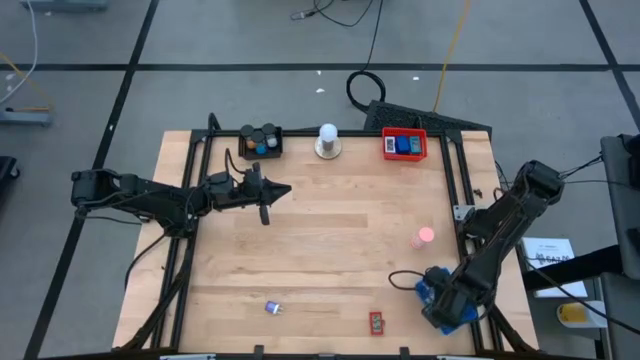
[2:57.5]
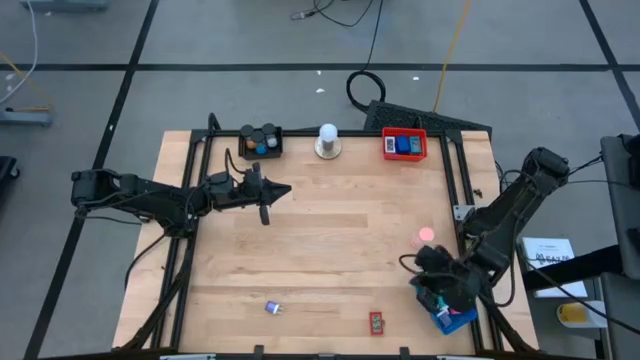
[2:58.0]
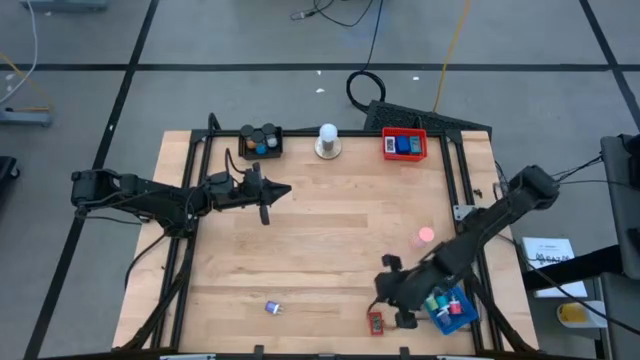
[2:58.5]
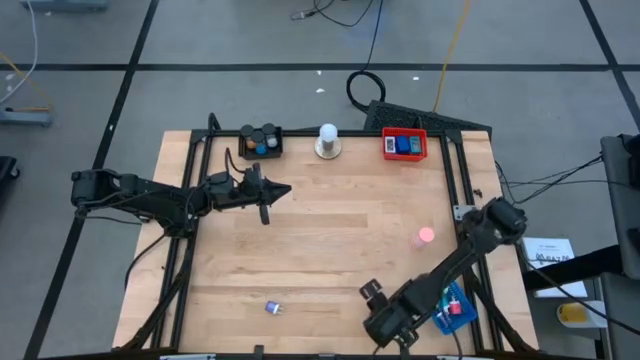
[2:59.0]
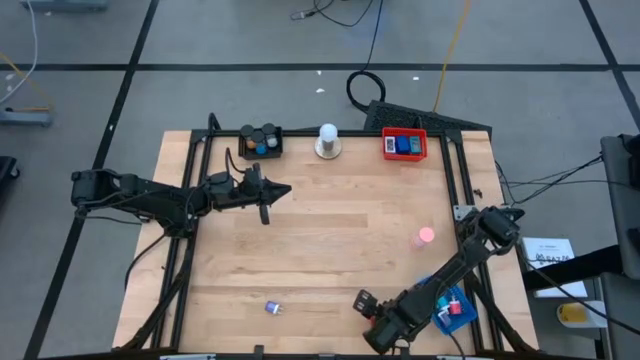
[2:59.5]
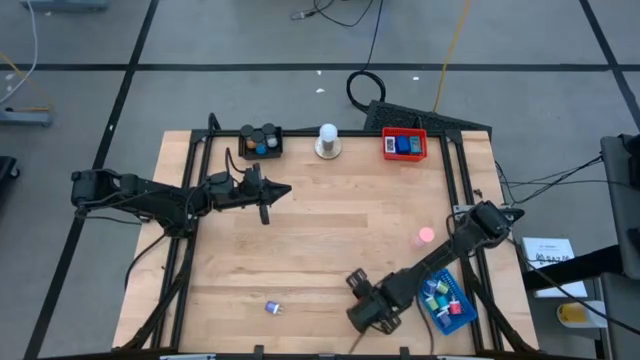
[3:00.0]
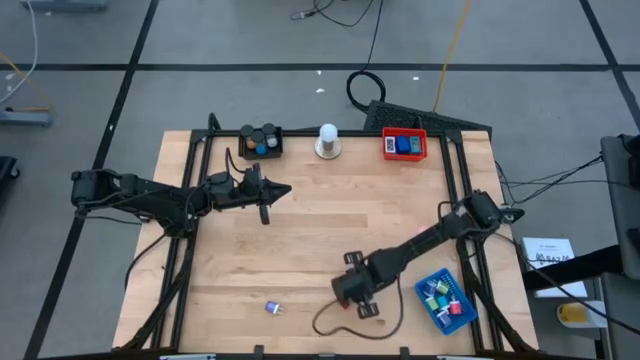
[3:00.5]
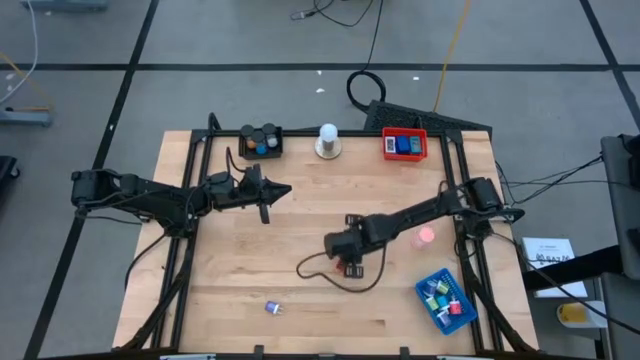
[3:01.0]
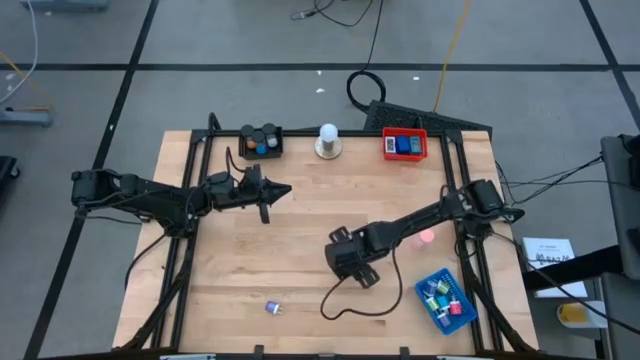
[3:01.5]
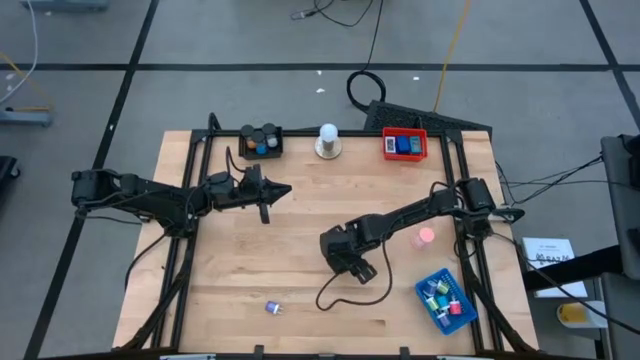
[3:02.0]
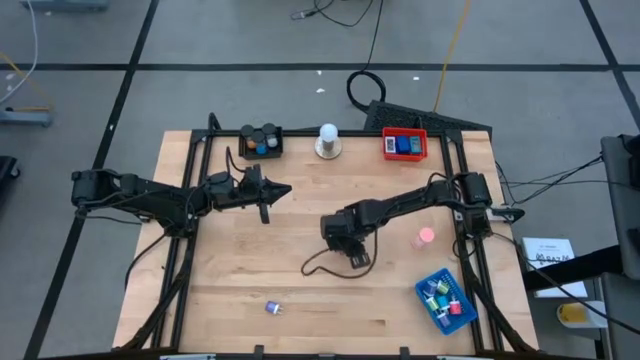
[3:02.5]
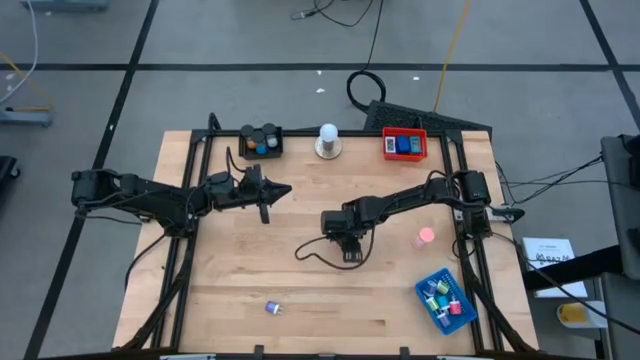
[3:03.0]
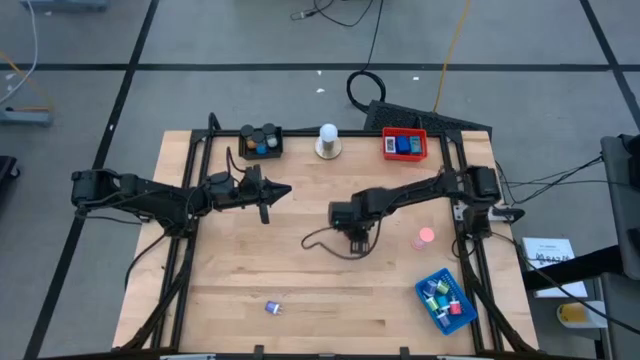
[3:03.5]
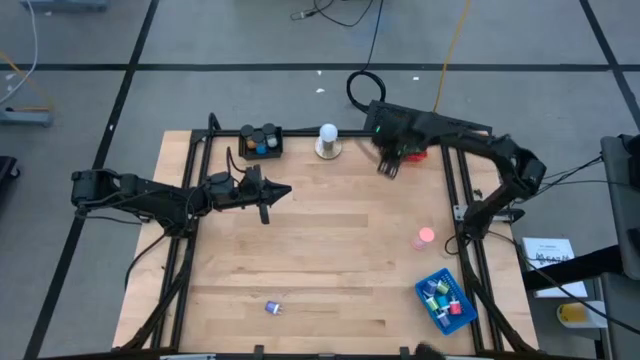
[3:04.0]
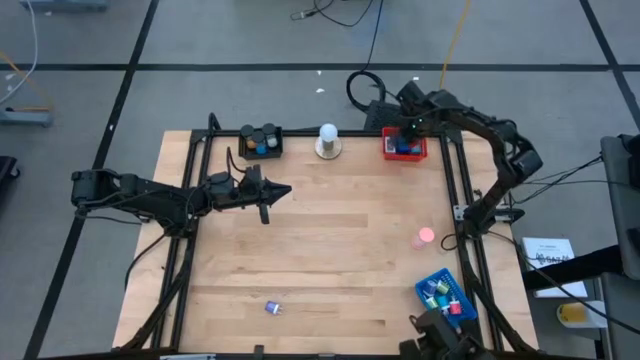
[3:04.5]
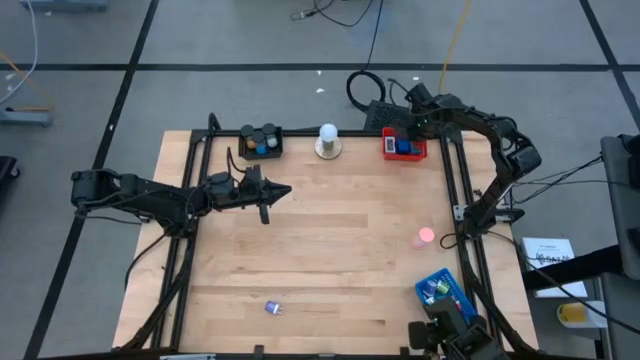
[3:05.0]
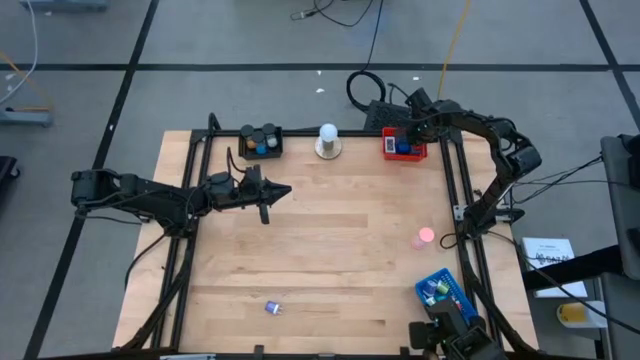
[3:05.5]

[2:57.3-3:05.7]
Task: Pick & Place Office items
Put the red digital timer into the red bin

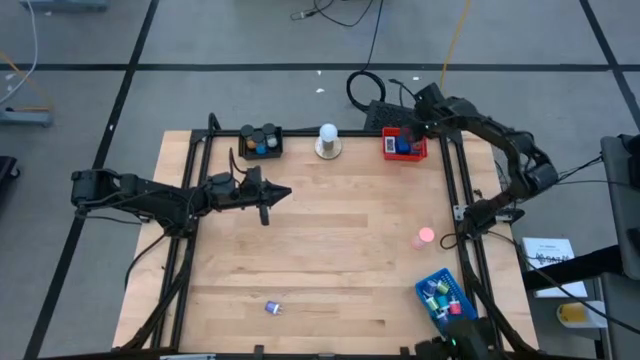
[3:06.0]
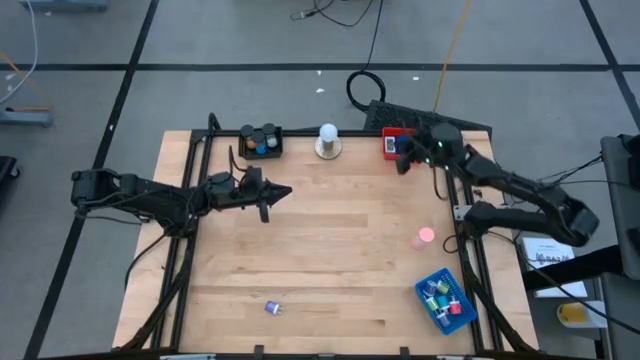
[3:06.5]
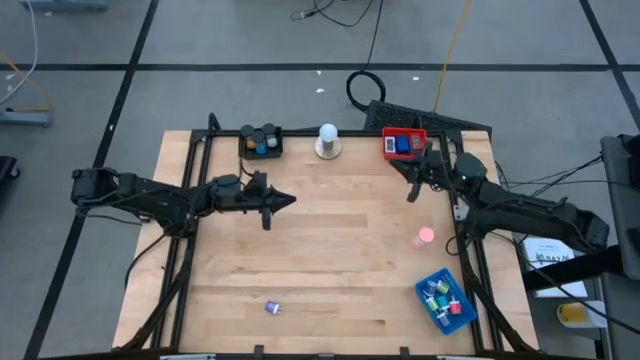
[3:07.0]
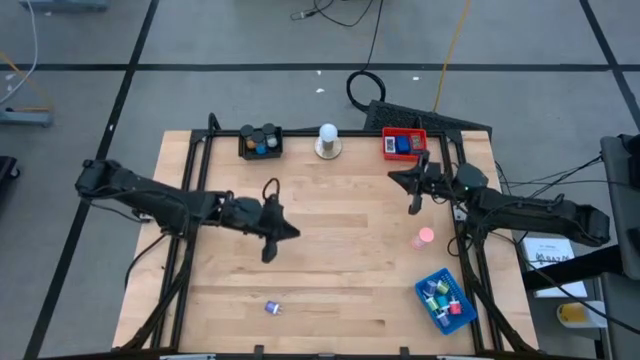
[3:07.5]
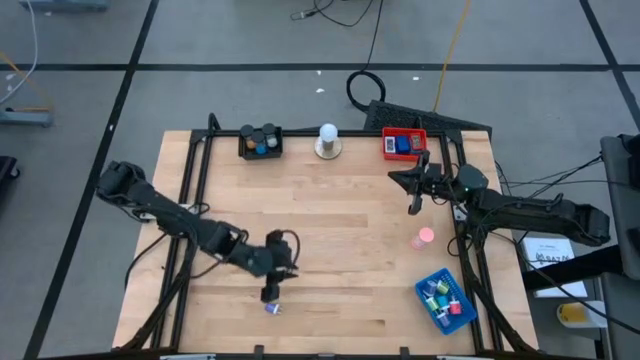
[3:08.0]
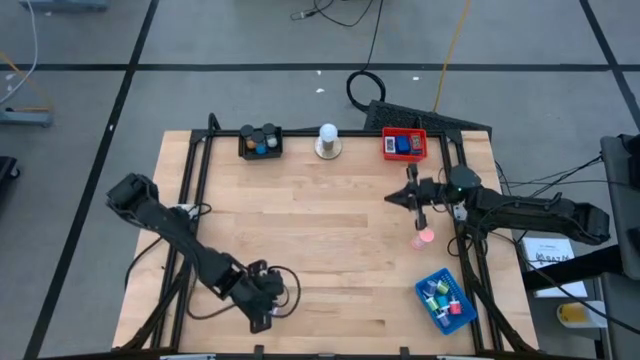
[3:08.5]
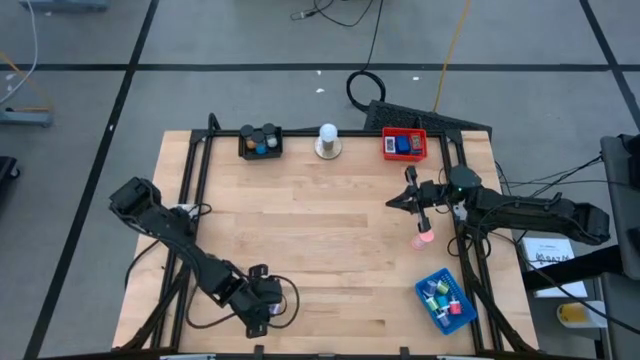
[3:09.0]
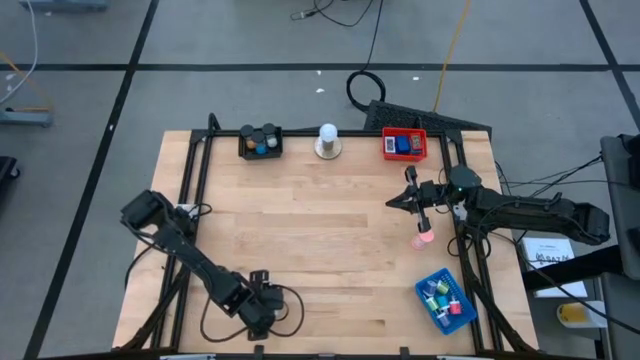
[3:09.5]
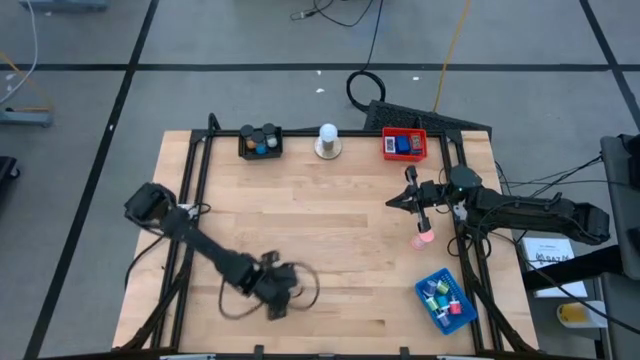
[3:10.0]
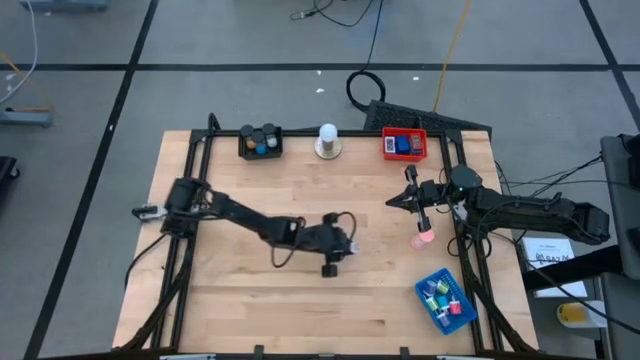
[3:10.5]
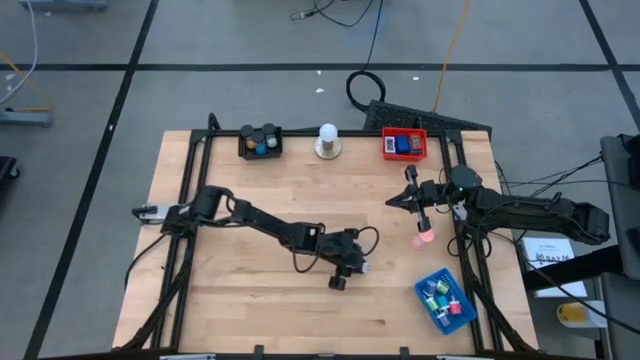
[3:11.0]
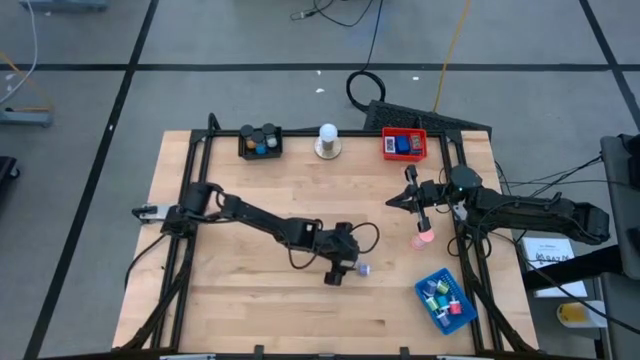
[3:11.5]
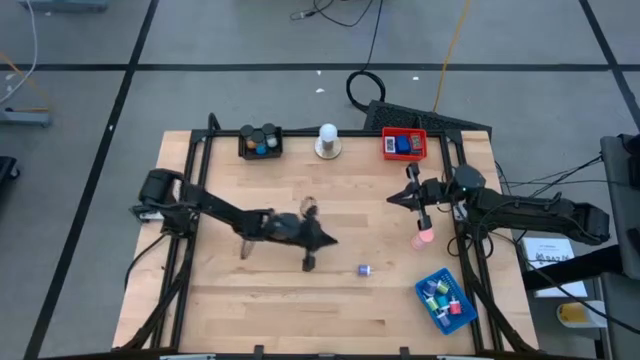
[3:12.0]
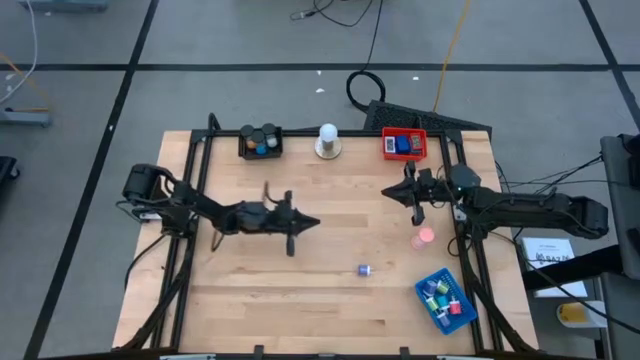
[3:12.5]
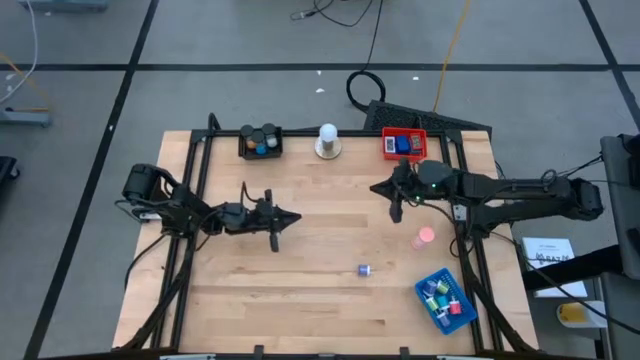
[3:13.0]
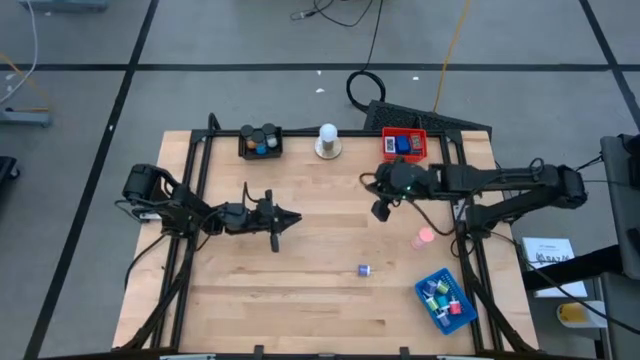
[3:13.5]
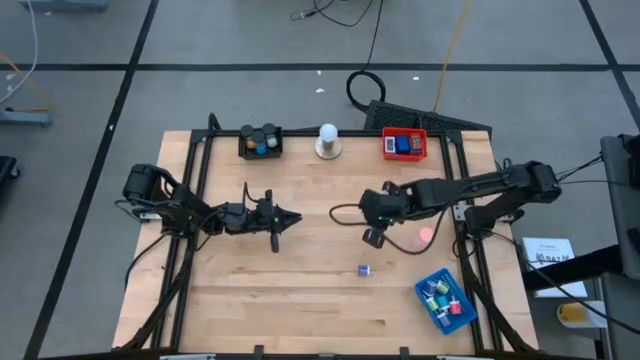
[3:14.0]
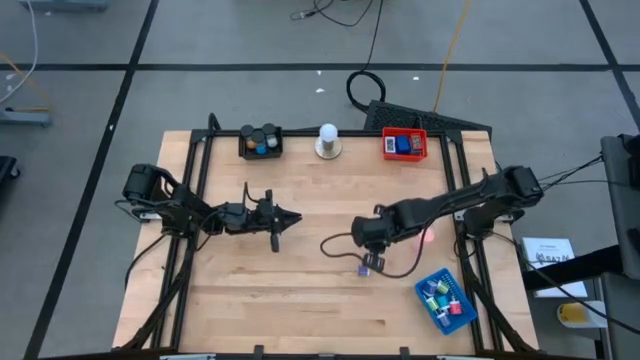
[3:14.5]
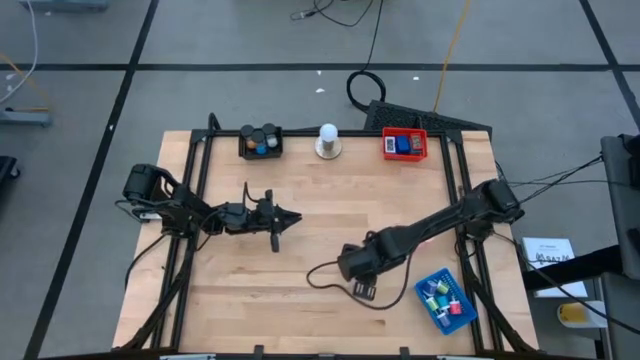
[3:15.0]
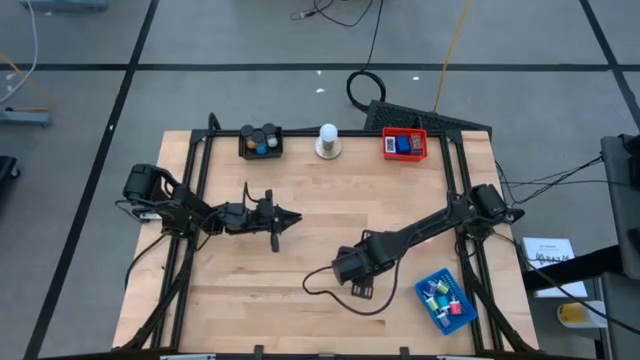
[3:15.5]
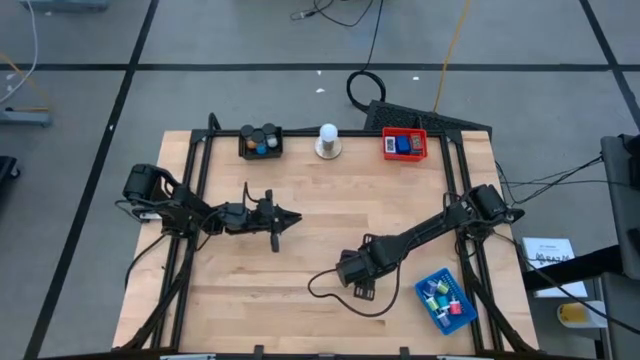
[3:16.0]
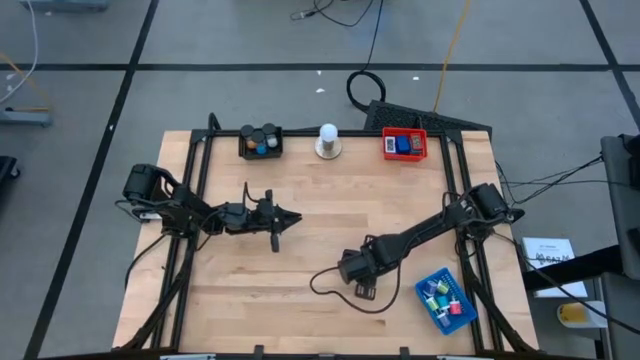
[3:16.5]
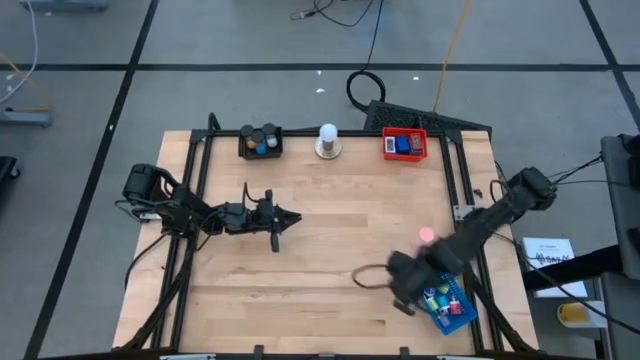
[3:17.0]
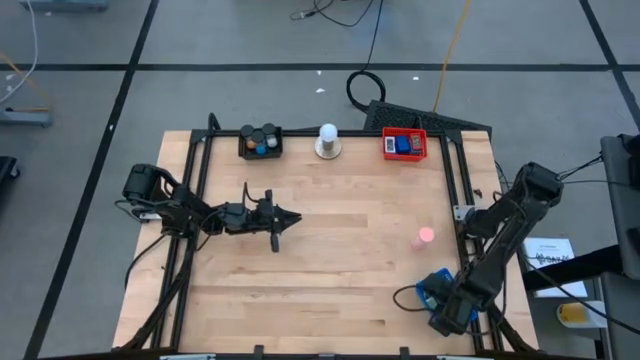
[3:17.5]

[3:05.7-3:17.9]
Put the violet charger adapter into the blue bin
